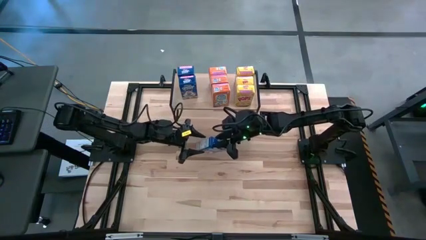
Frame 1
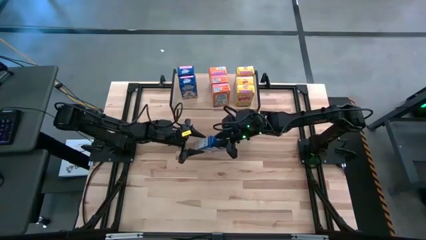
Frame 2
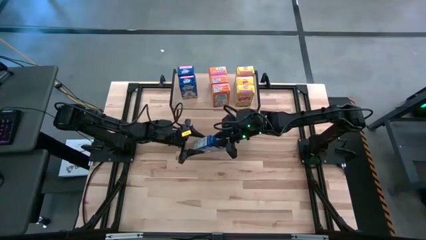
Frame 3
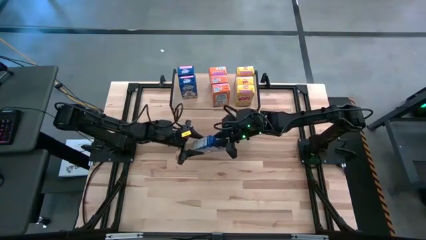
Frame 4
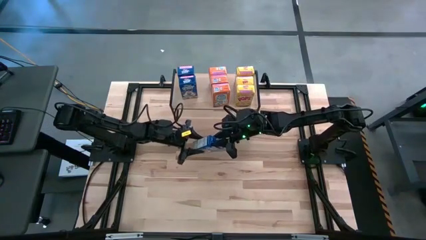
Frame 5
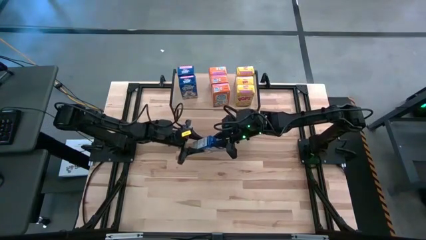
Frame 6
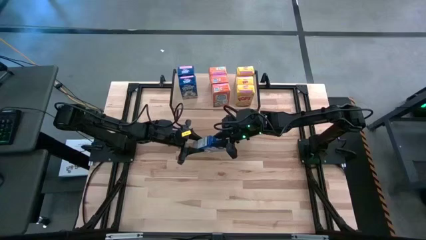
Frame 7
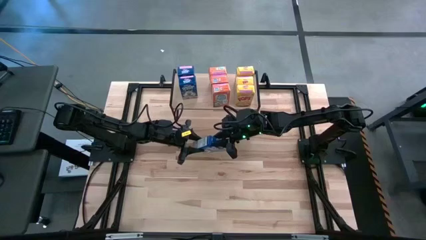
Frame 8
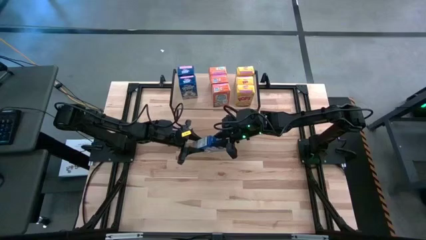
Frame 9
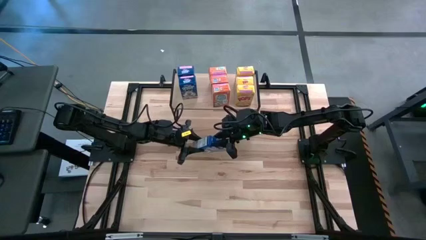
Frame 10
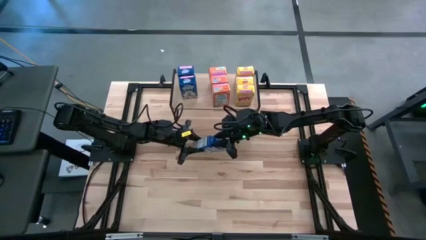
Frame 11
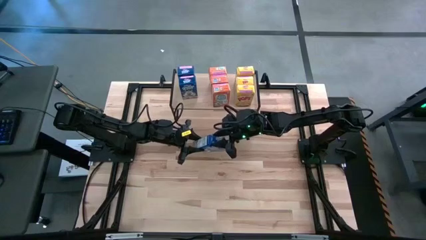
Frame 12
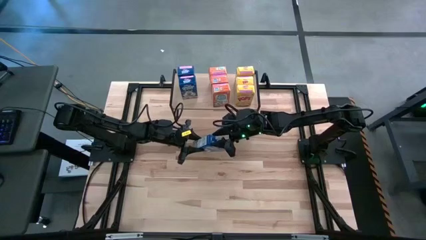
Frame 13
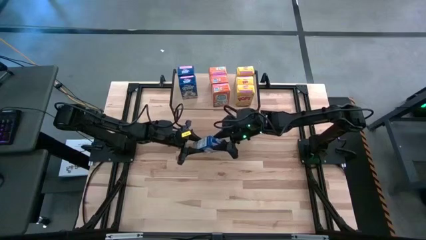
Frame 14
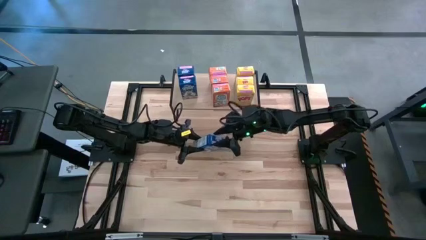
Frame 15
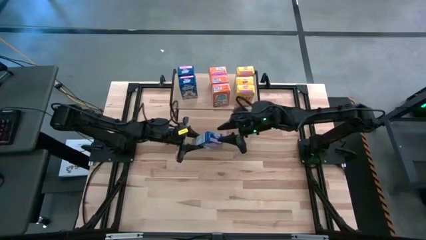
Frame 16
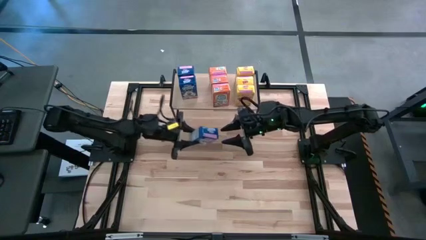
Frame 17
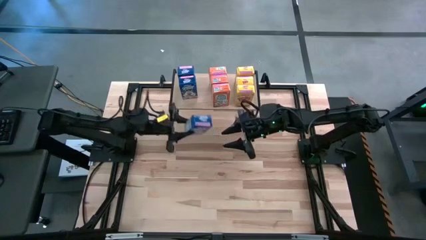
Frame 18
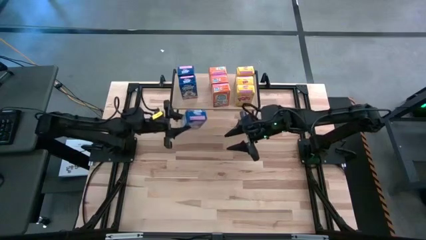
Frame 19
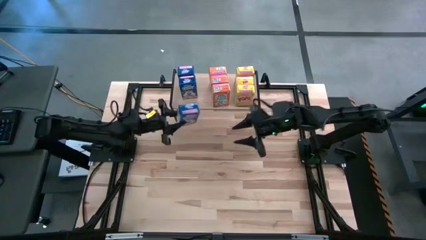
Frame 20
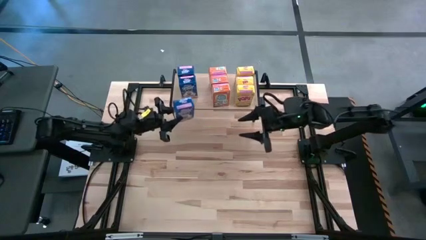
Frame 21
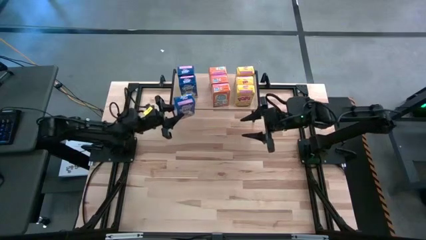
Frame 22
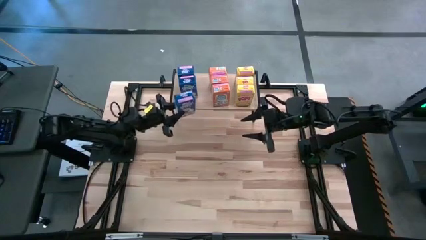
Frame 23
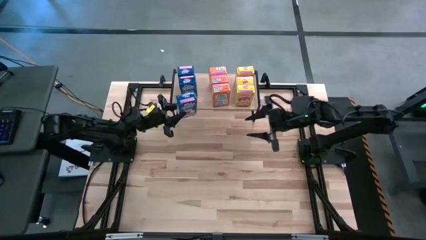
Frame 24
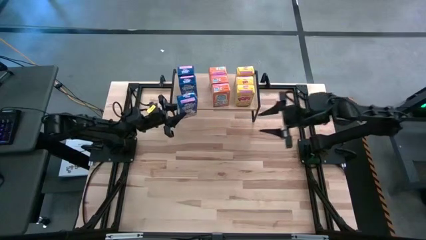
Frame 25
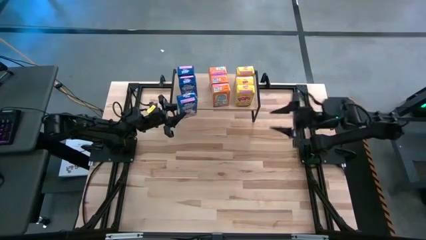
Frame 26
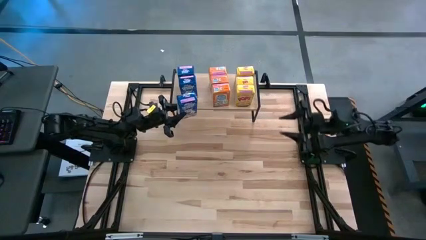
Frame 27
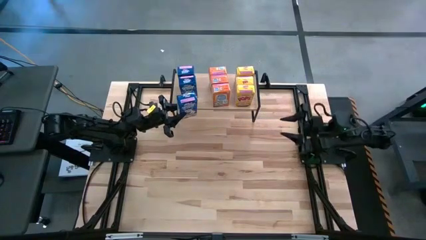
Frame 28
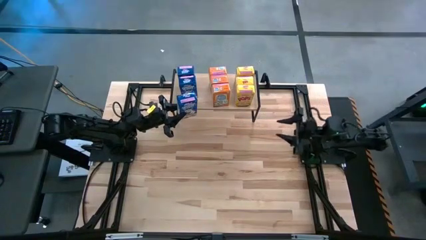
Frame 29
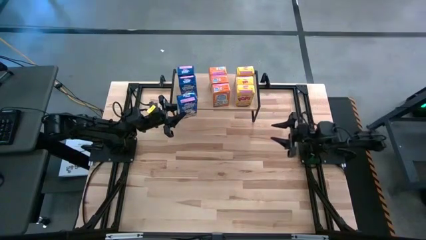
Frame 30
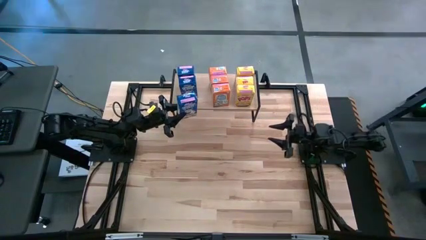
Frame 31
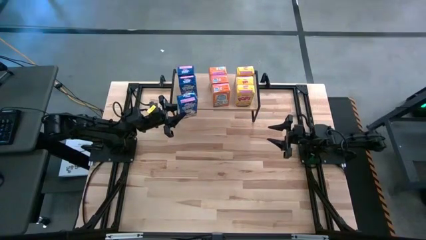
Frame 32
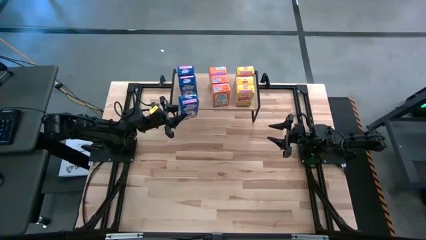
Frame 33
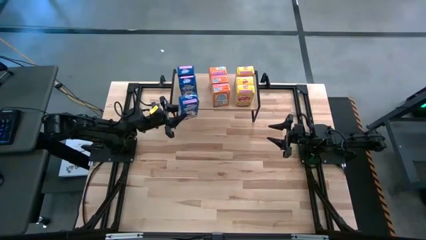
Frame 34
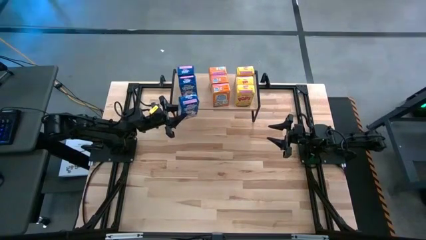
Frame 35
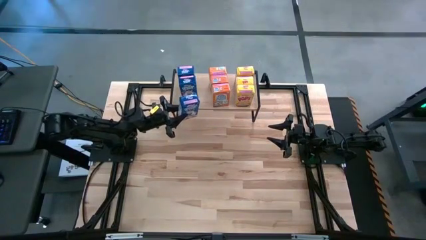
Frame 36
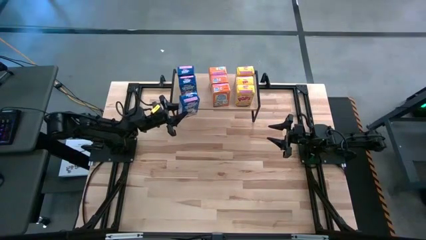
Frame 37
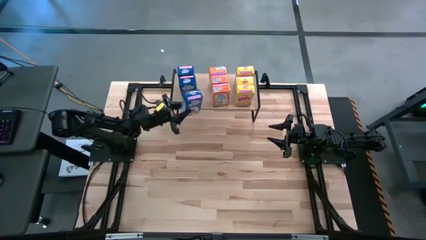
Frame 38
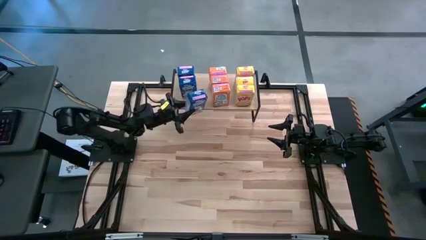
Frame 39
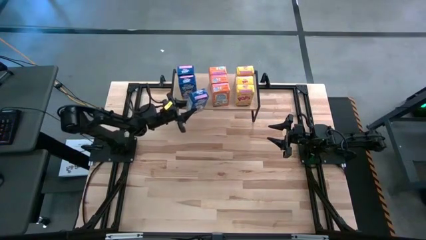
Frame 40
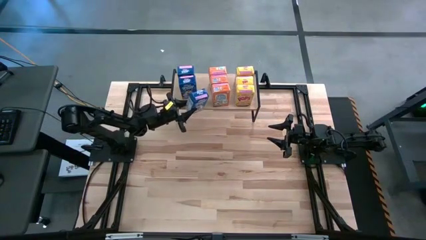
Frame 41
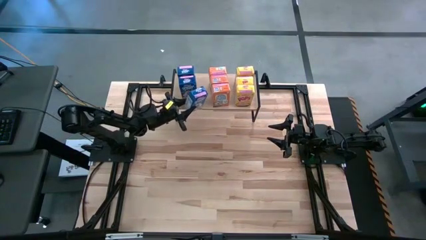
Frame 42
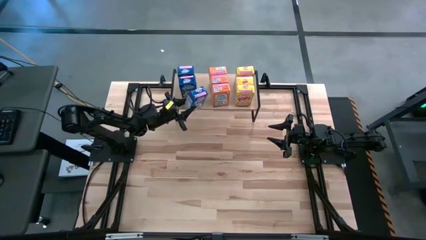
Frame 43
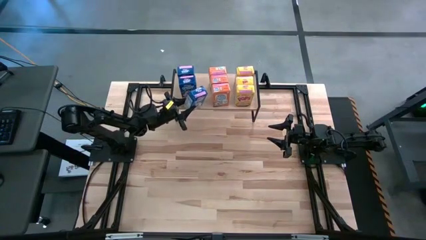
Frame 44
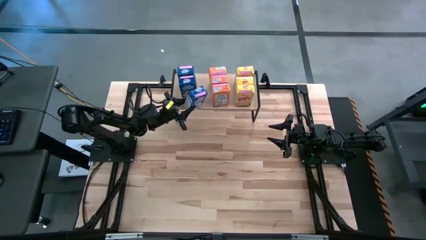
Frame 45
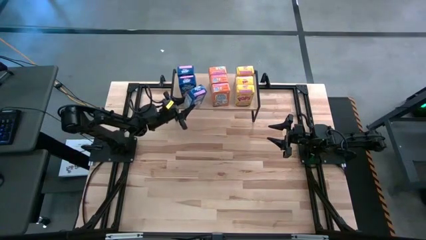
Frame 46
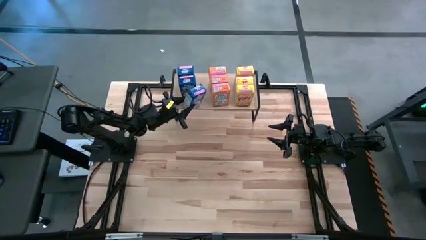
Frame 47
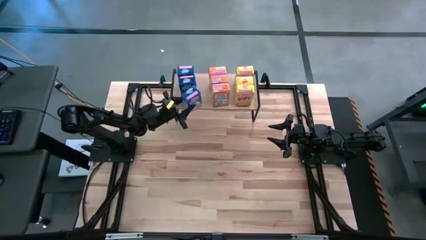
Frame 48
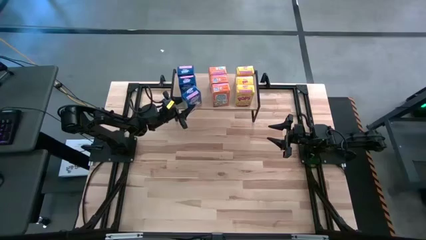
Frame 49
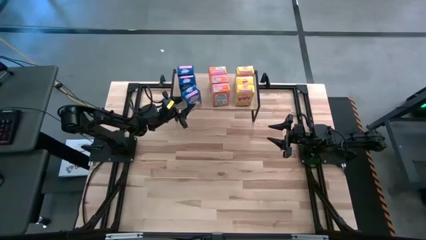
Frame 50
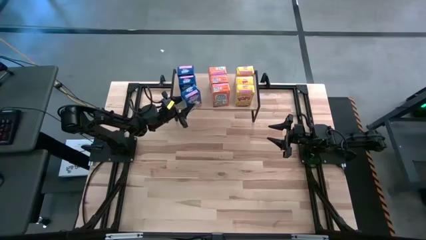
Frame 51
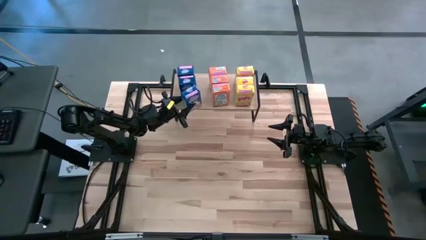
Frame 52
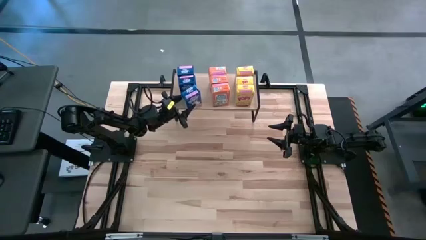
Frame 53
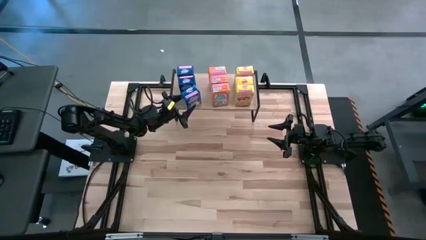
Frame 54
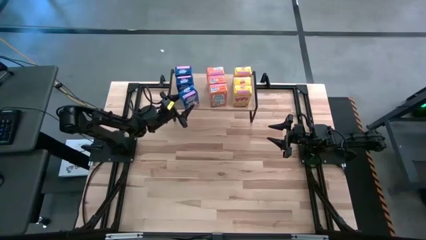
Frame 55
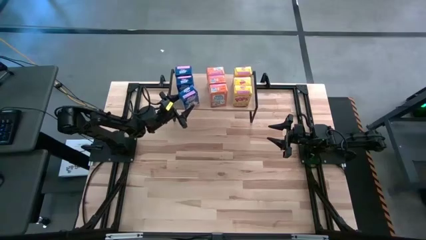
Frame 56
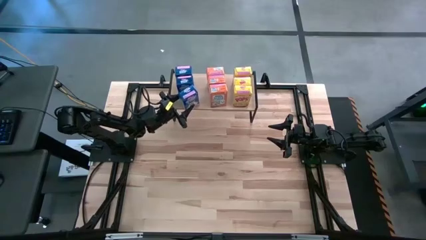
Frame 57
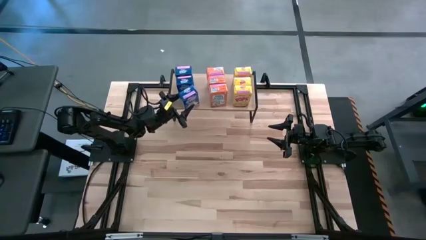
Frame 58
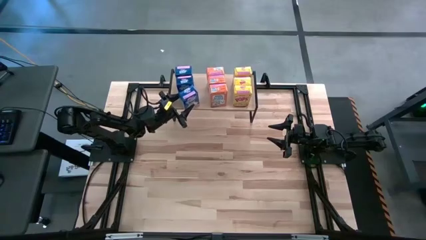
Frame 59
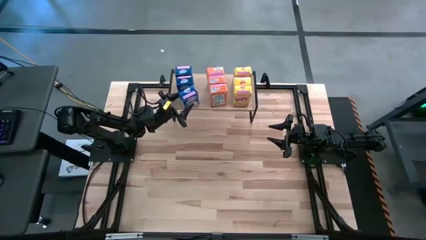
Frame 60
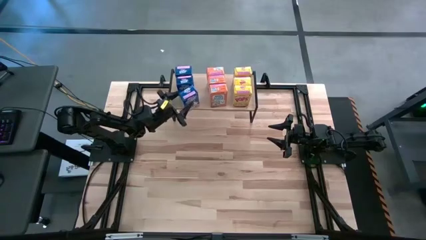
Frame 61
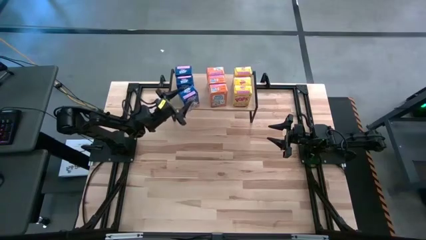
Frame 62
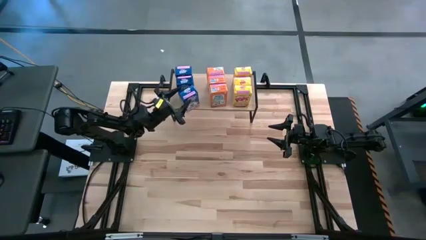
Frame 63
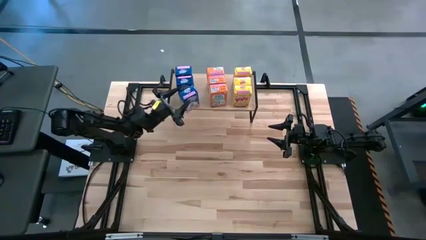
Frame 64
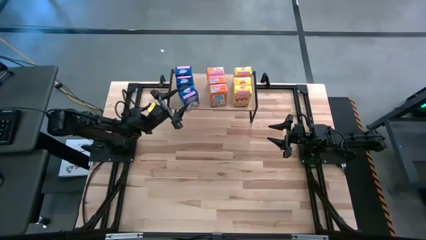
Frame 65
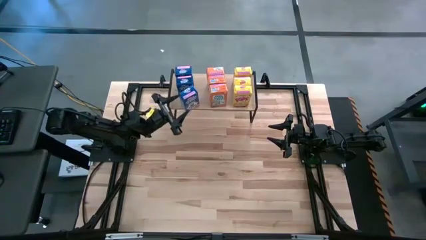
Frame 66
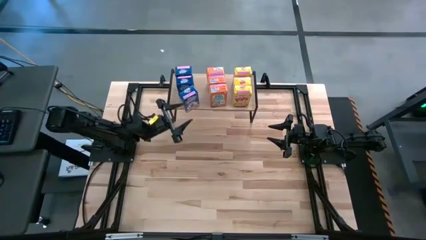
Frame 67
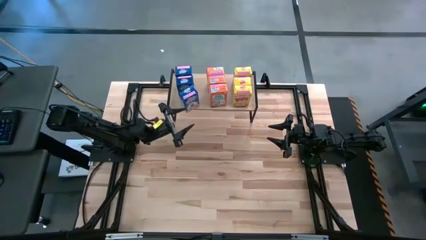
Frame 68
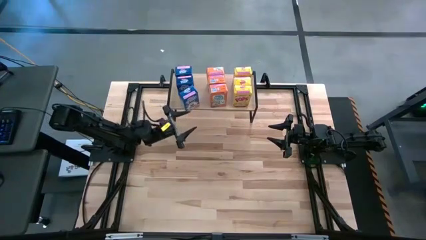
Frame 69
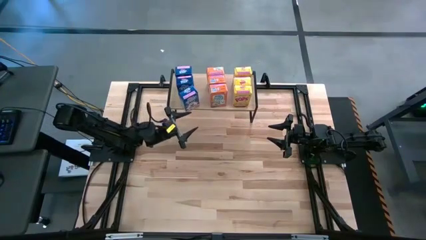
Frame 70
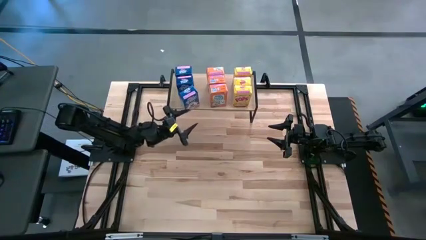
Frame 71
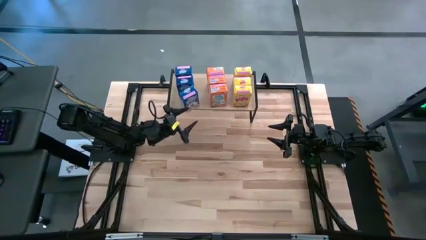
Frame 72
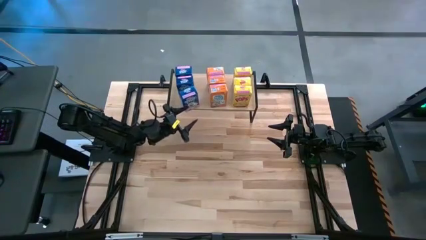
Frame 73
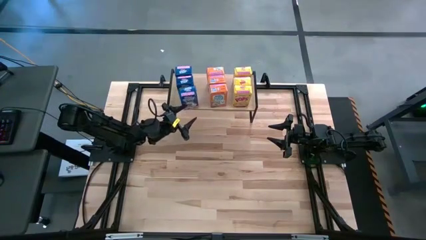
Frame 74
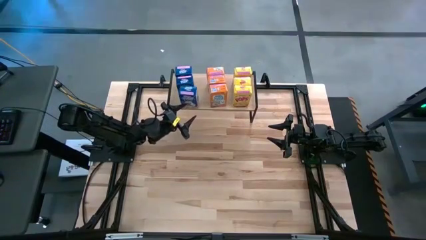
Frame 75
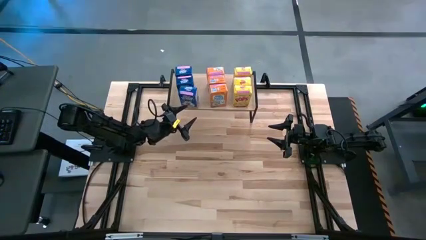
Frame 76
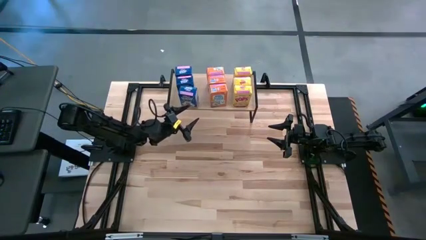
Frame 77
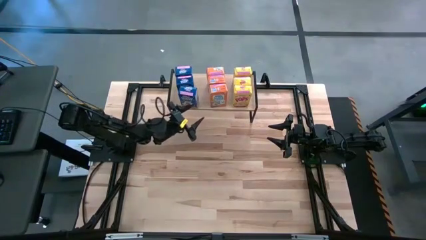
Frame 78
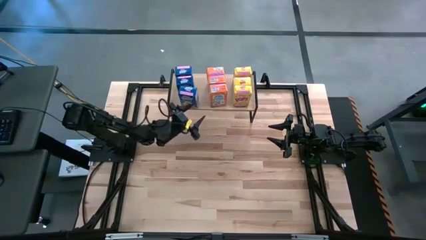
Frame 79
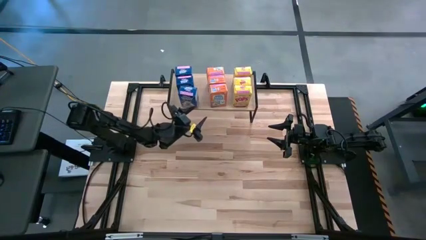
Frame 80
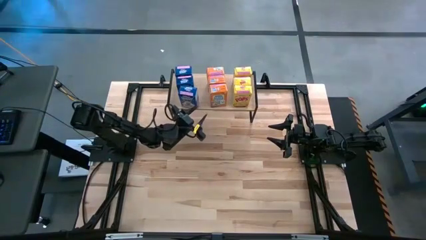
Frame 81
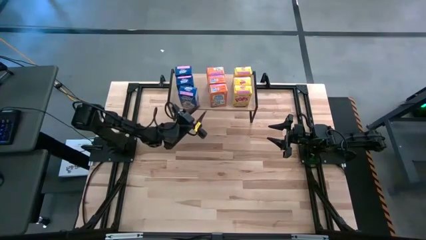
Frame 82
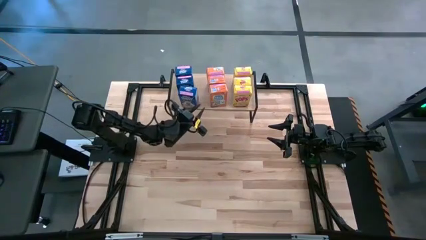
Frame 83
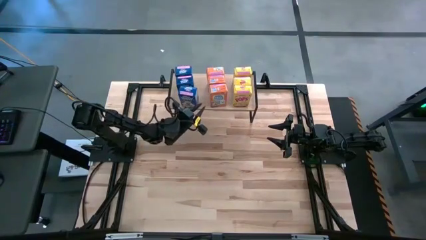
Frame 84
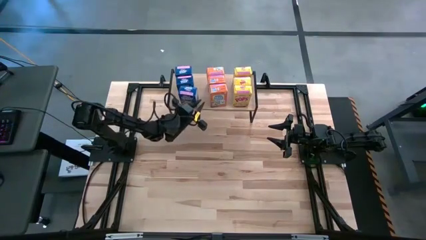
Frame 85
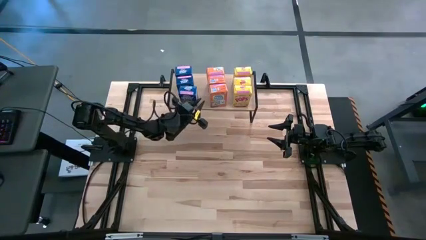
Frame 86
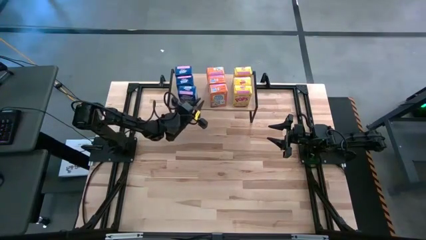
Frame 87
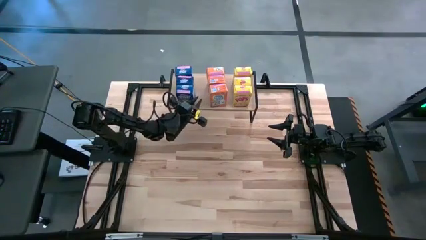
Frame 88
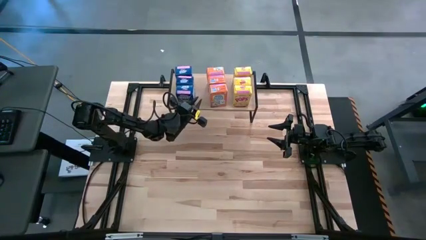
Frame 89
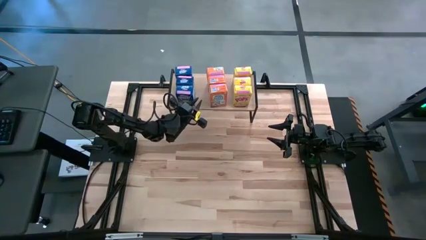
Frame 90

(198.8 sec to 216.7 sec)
Task: Stack cereal on shelf
Put the blue cereal box aligned with the other blue cereal boxes on the shelf
